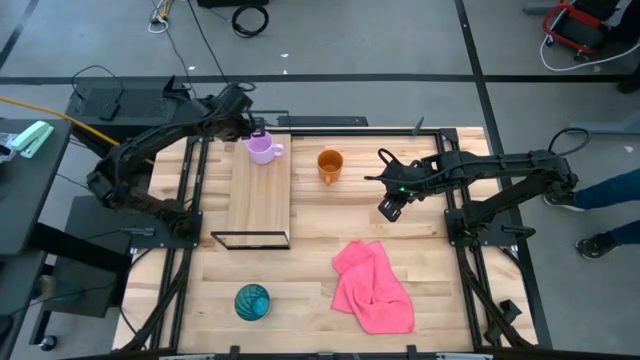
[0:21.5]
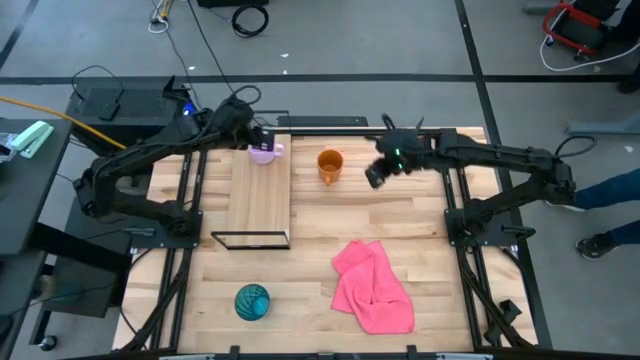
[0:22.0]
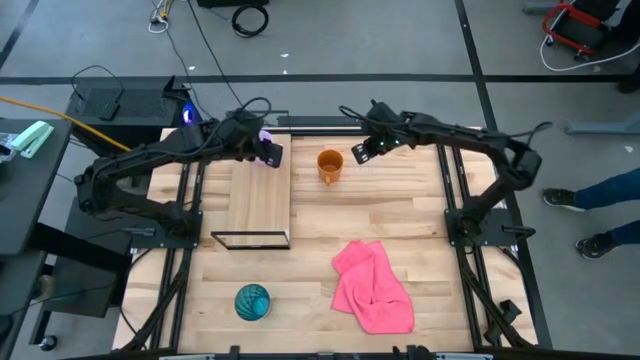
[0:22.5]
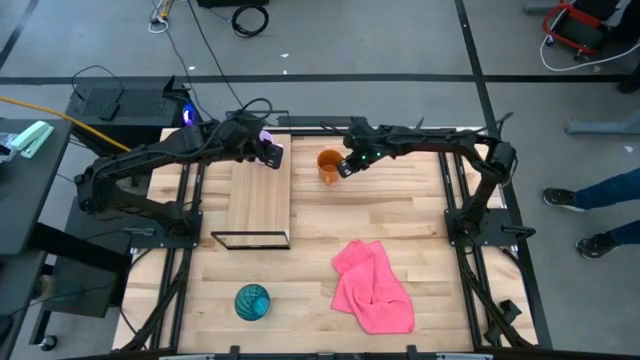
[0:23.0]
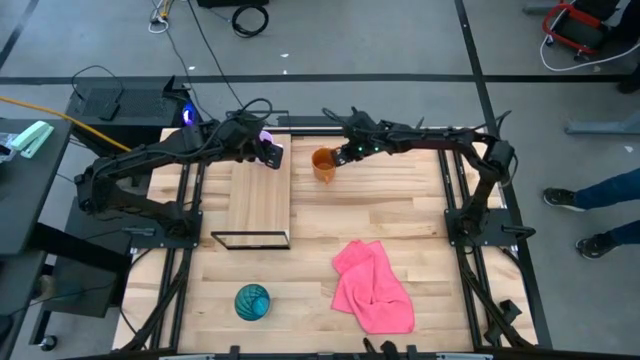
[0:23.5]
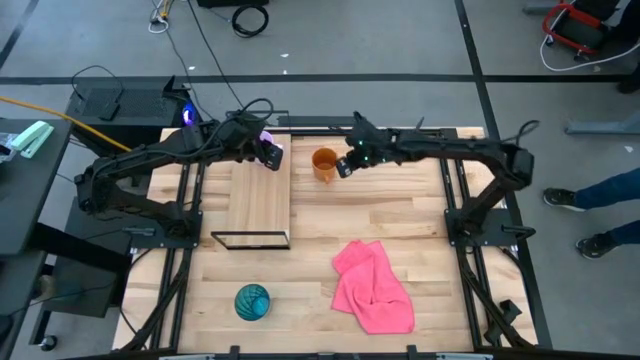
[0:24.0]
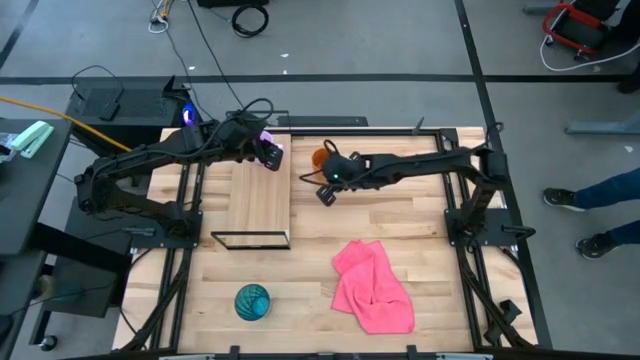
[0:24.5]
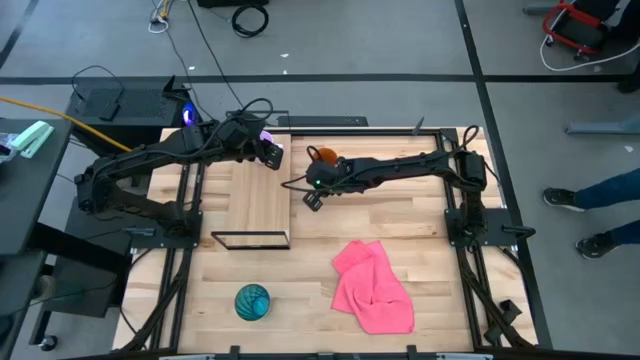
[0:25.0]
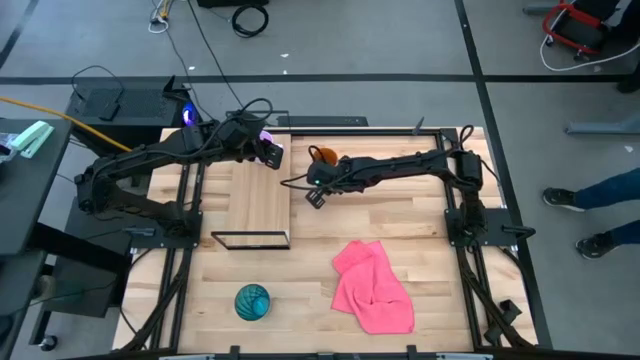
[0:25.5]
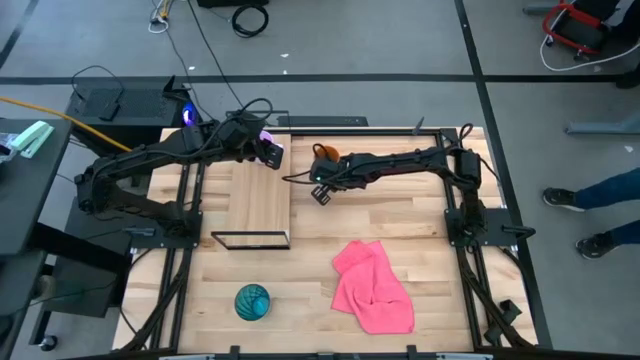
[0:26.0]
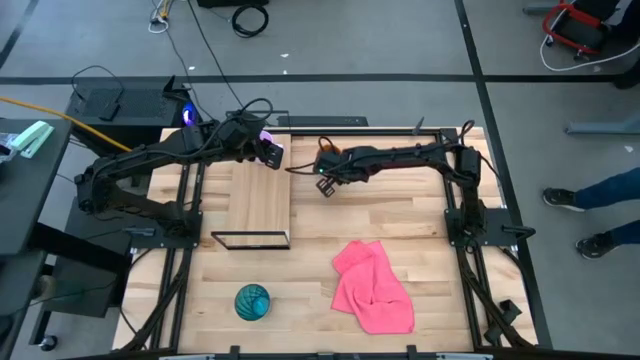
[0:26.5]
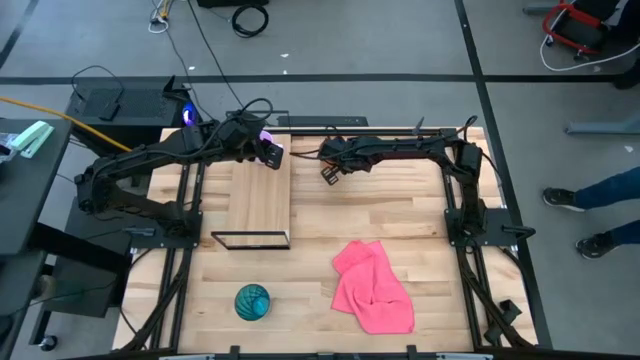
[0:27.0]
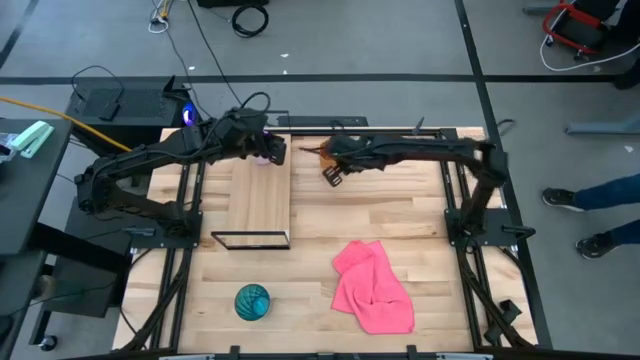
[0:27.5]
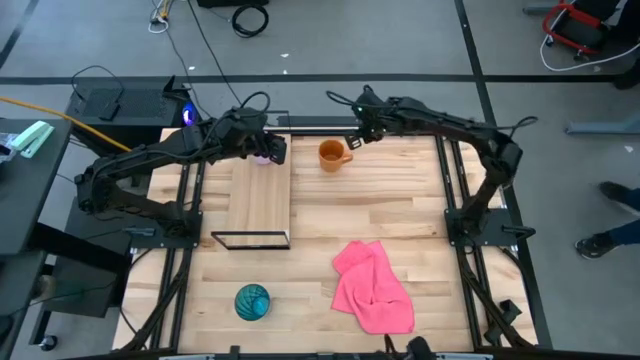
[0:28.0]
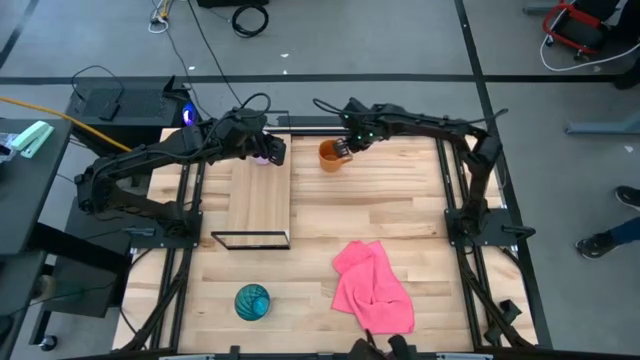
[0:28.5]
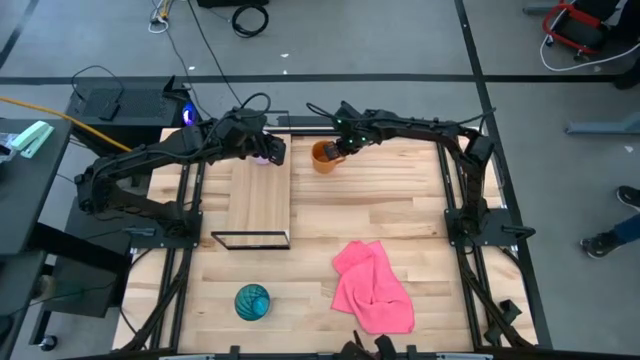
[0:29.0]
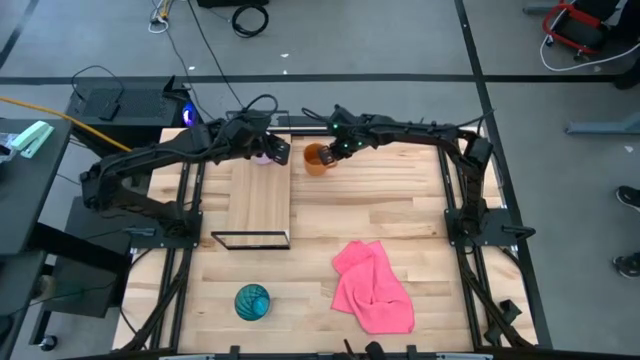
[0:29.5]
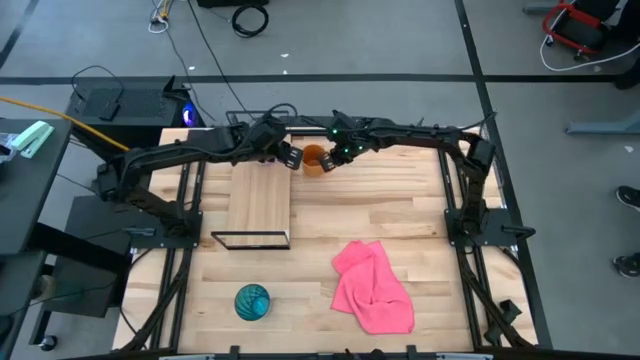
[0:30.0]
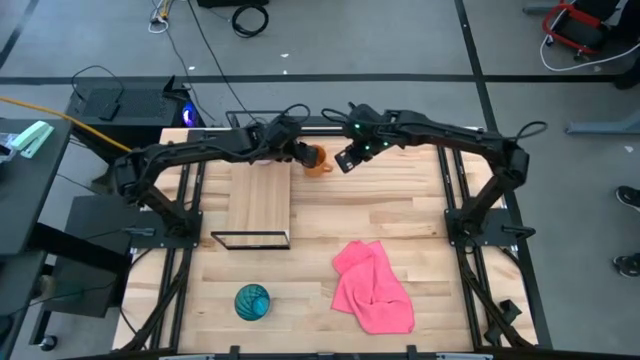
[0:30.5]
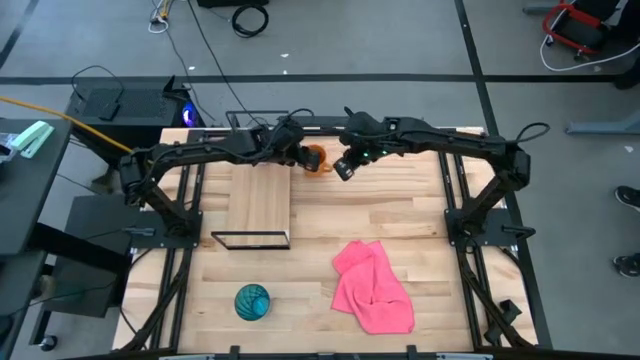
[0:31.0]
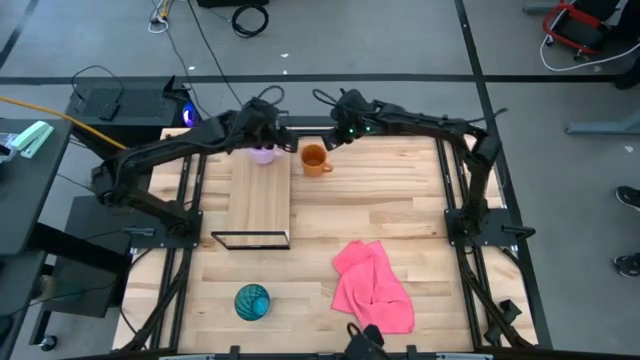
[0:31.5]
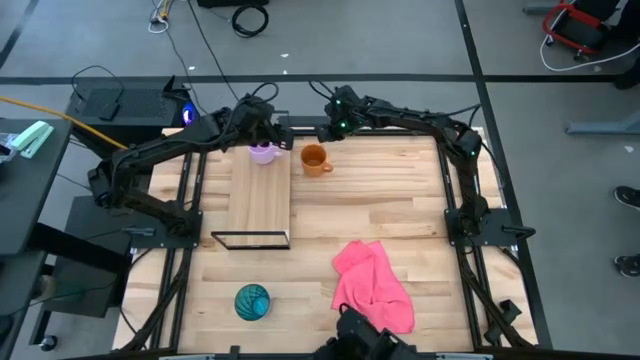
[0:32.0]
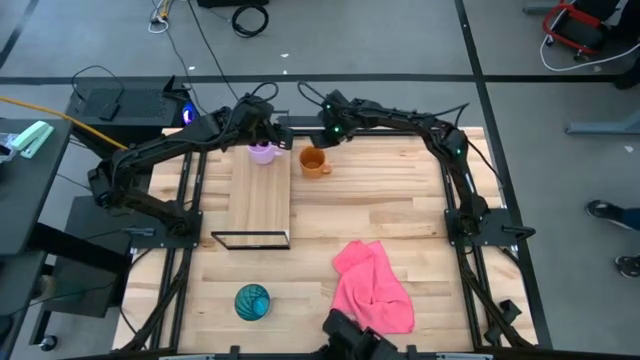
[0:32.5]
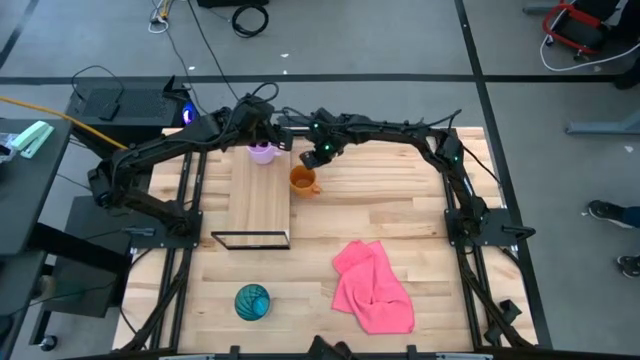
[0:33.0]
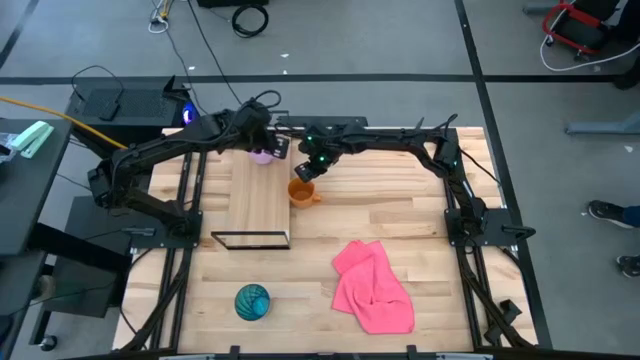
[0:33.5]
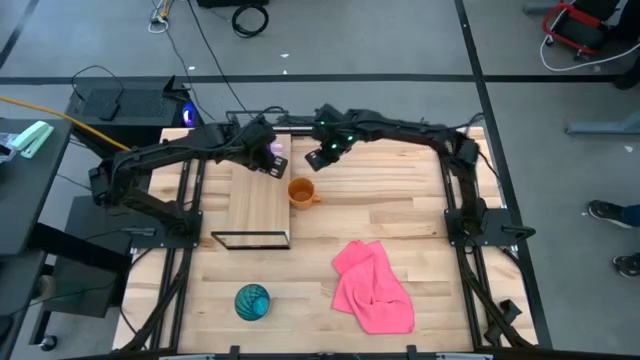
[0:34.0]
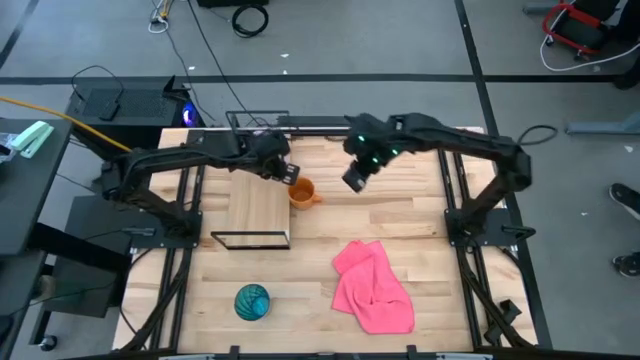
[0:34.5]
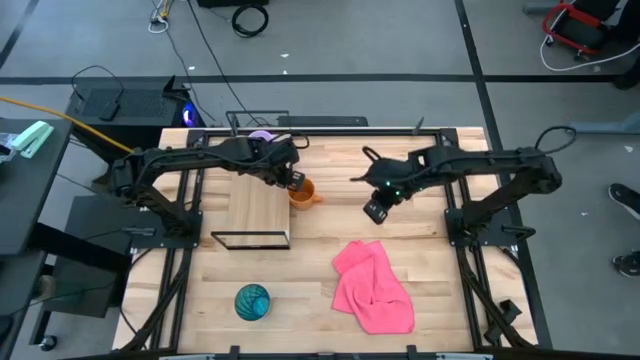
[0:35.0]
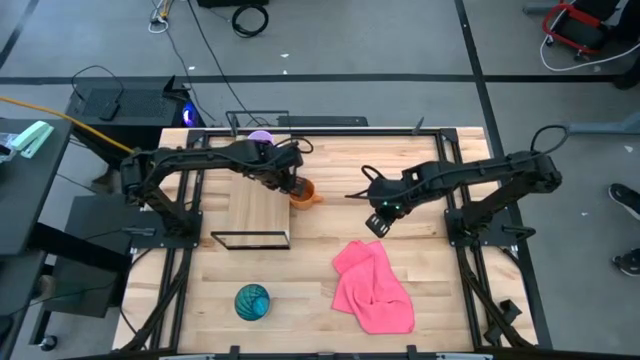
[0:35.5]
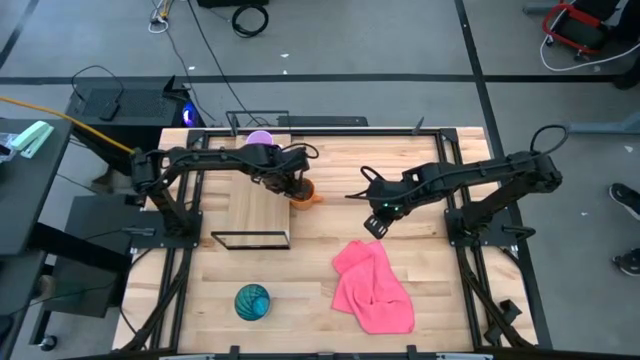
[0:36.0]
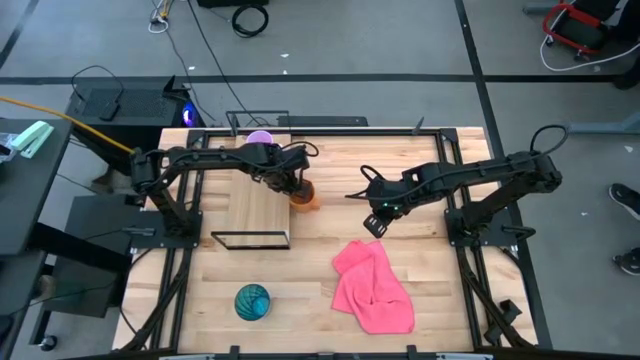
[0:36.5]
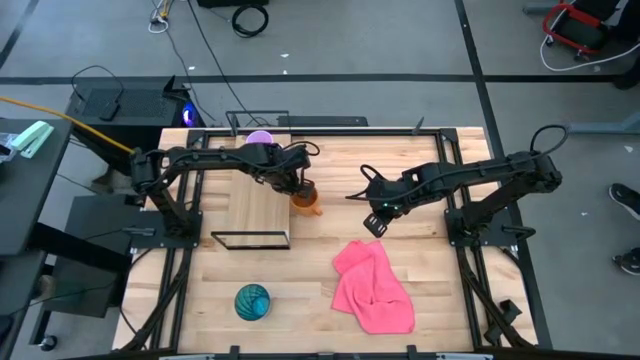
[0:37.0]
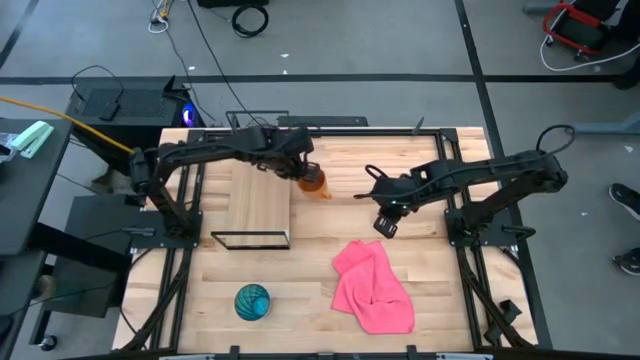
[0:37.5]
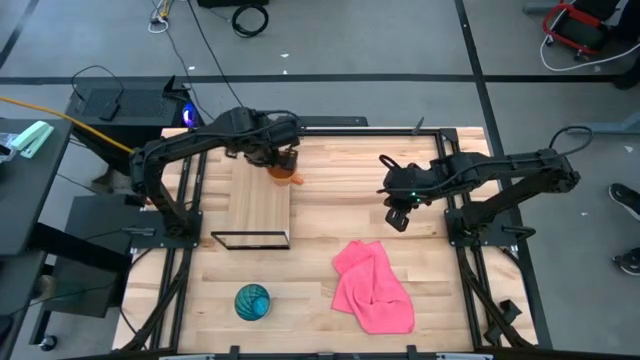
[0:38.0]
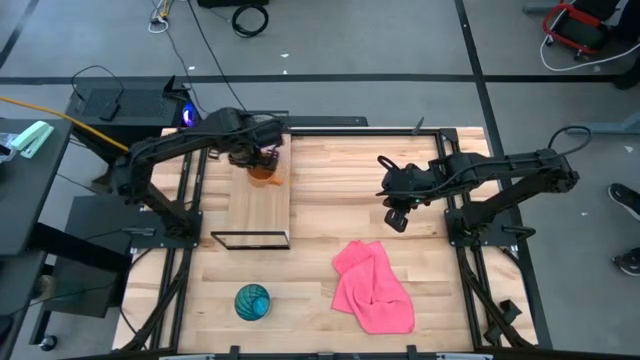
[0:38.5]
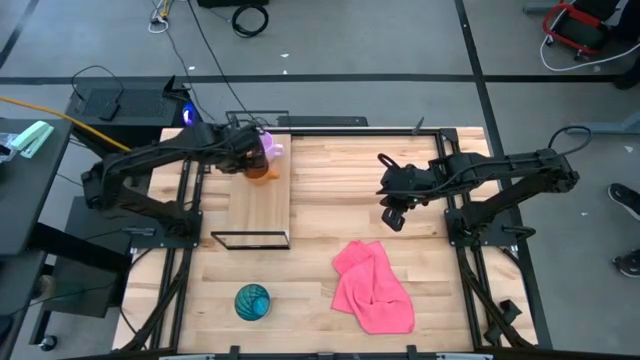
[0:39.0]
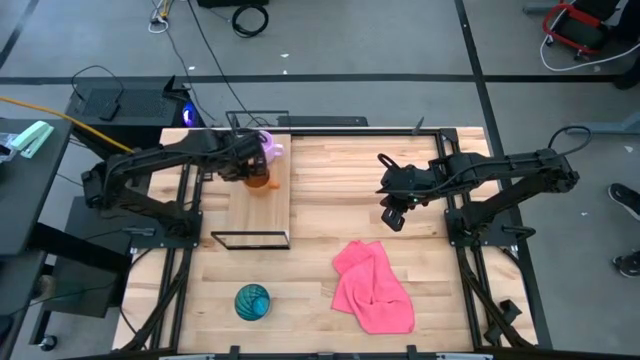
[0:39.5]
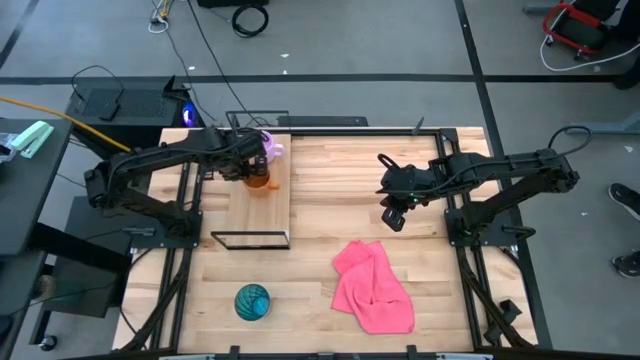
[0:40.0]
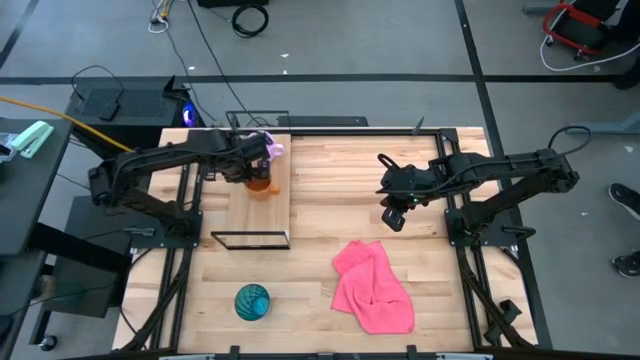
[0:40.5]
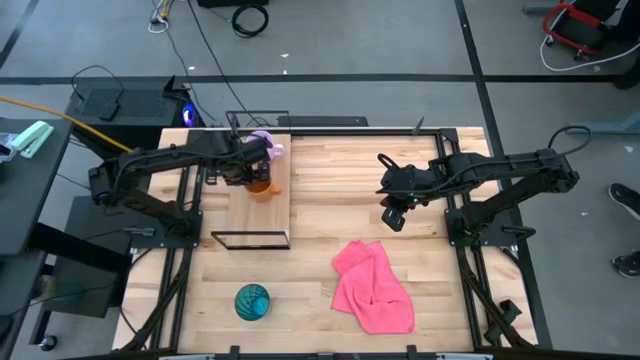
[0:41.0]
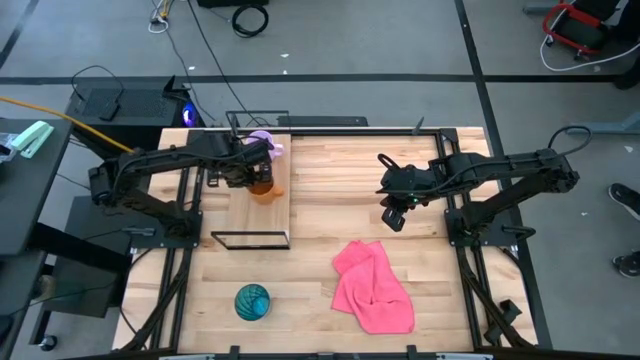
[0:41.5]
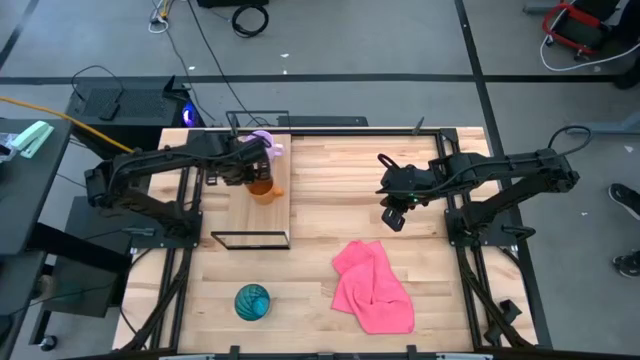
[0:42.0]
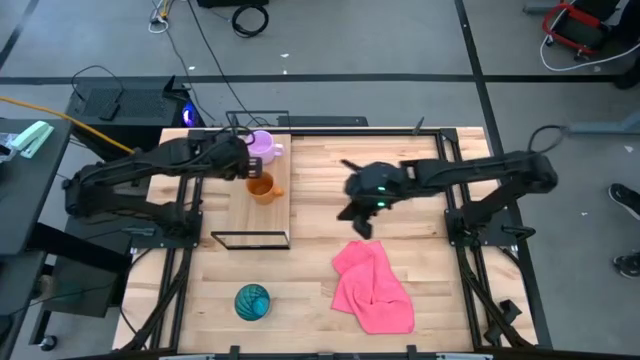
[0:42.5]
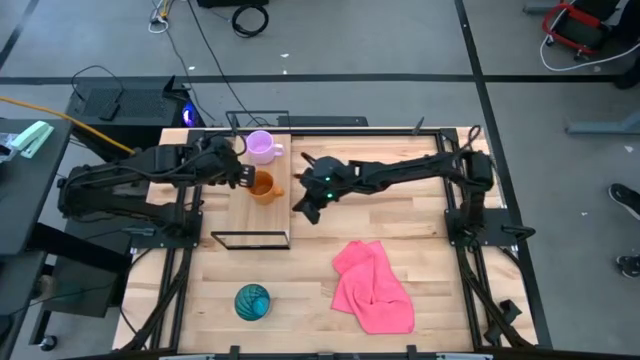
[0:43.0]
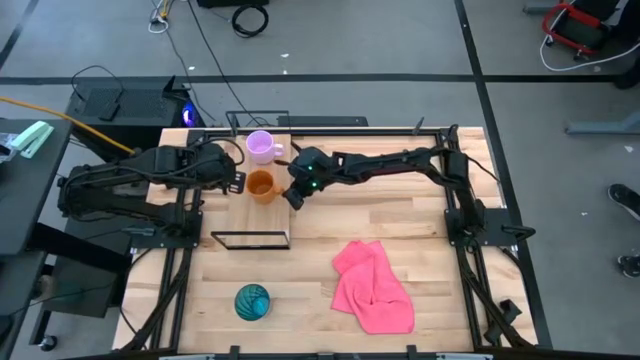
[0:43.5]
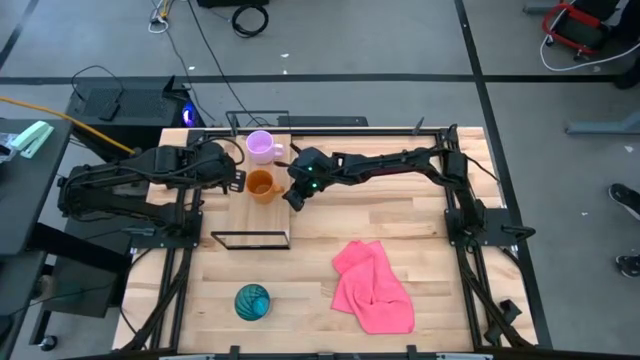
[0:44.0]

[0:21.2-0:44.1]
Task: Stack small to large cups/mugs on shelf
Put the orange mug on the shelf
